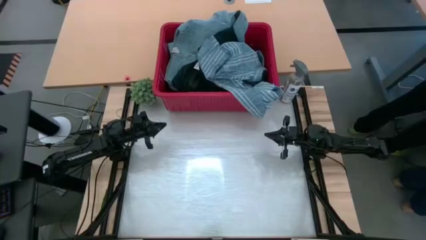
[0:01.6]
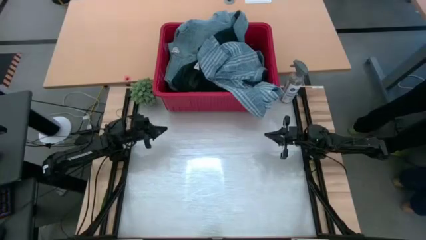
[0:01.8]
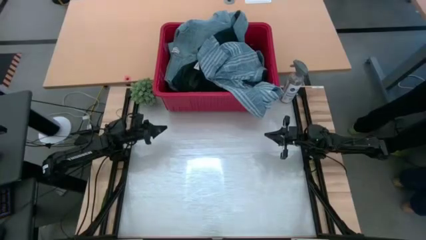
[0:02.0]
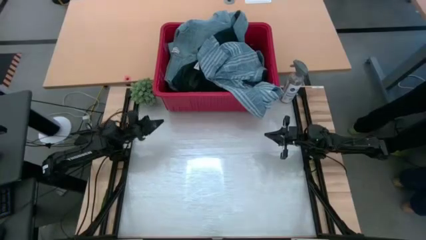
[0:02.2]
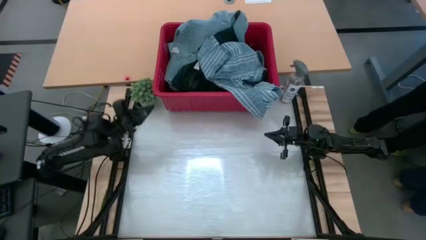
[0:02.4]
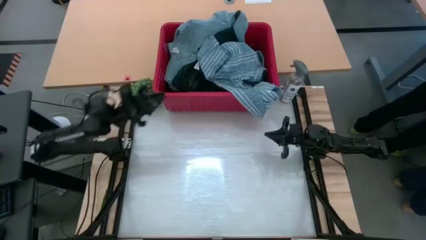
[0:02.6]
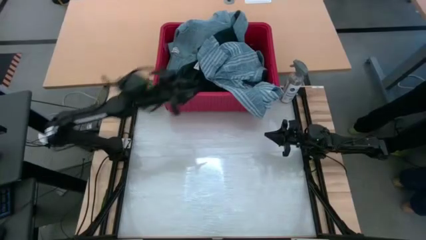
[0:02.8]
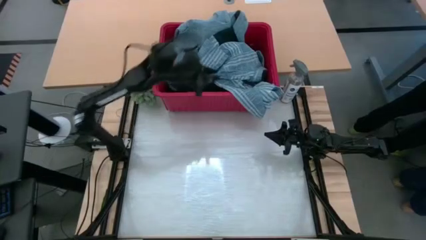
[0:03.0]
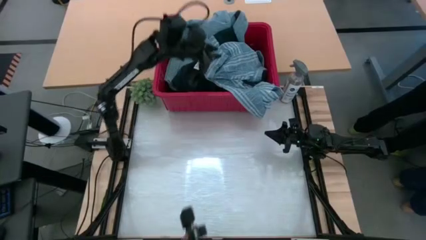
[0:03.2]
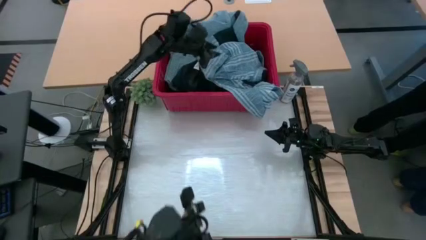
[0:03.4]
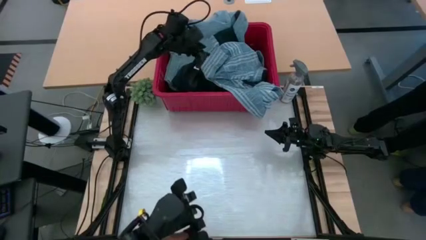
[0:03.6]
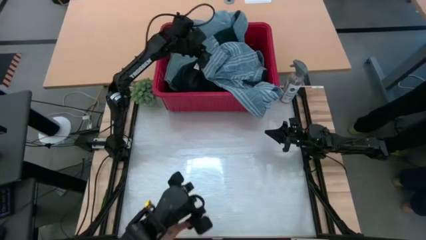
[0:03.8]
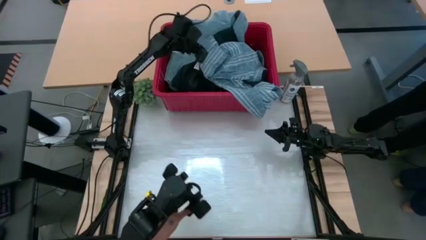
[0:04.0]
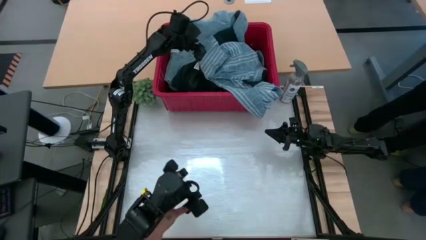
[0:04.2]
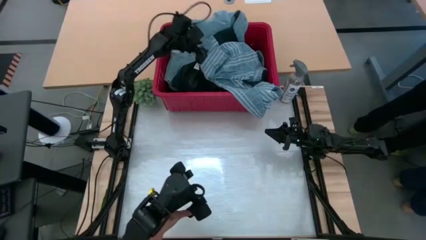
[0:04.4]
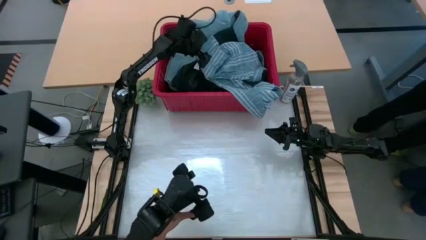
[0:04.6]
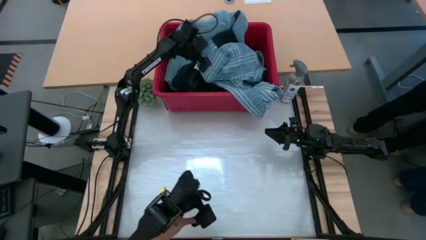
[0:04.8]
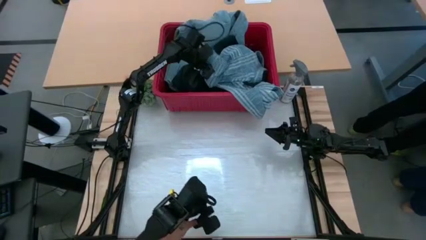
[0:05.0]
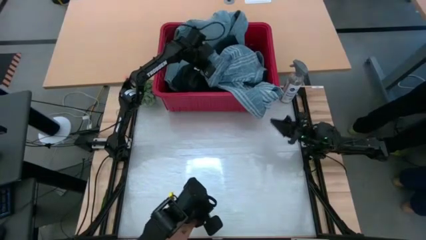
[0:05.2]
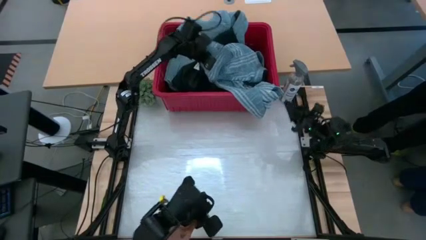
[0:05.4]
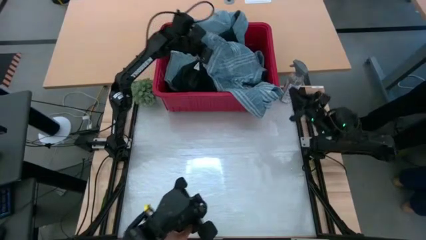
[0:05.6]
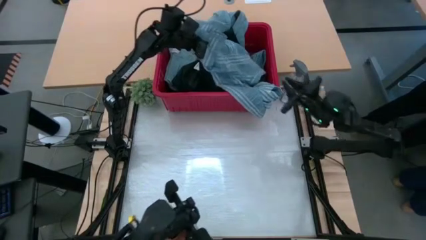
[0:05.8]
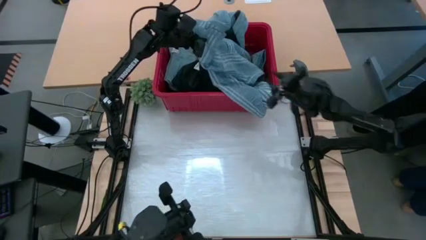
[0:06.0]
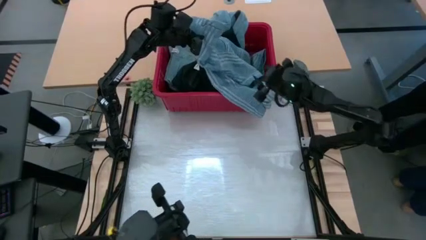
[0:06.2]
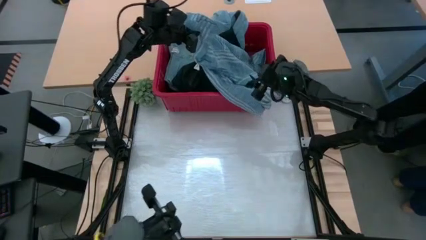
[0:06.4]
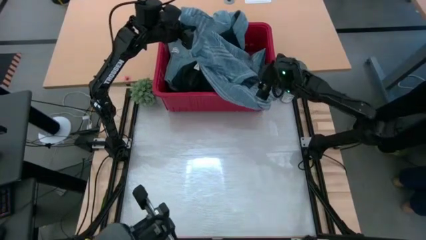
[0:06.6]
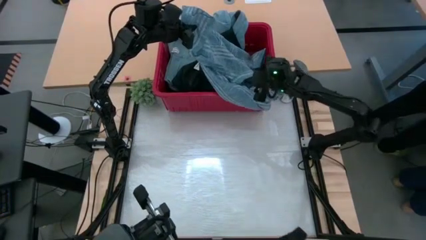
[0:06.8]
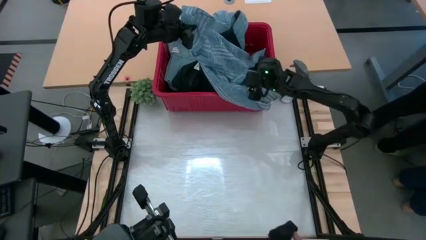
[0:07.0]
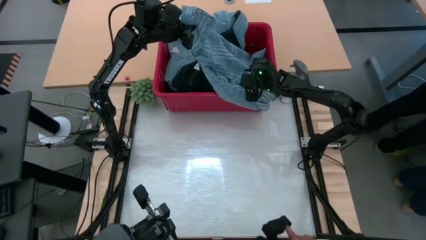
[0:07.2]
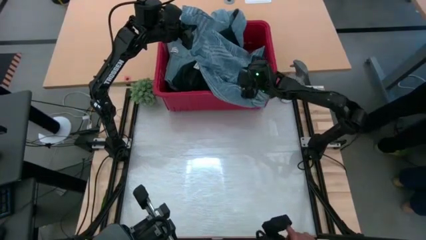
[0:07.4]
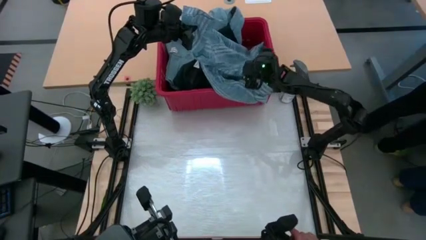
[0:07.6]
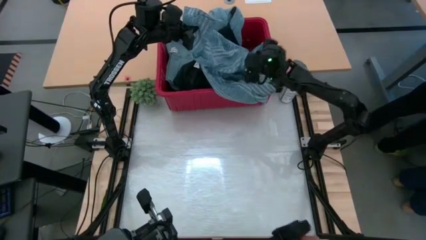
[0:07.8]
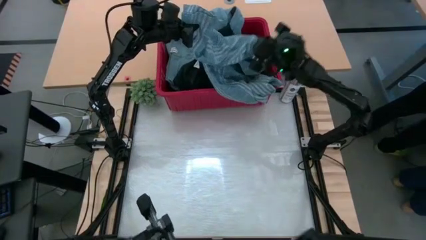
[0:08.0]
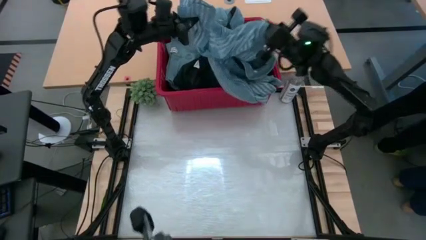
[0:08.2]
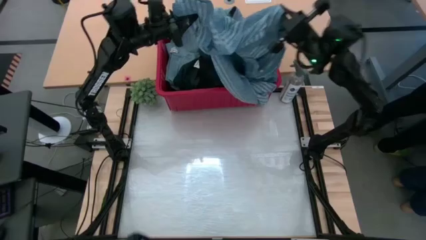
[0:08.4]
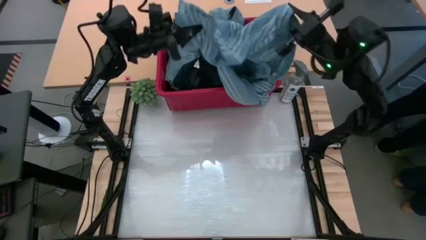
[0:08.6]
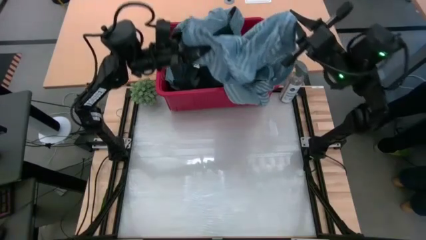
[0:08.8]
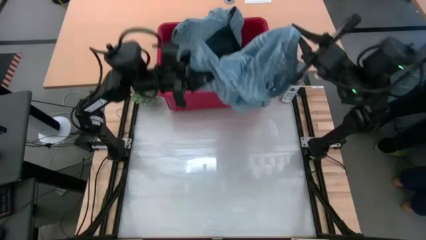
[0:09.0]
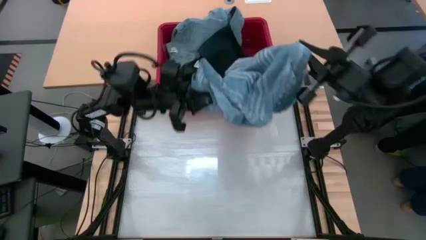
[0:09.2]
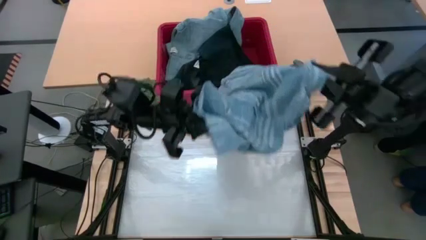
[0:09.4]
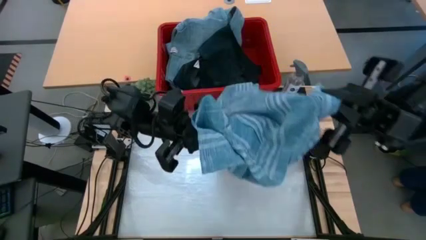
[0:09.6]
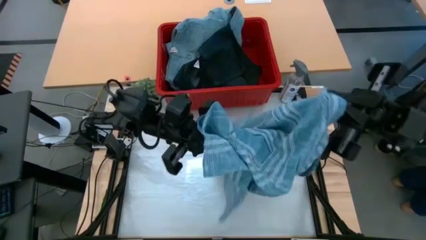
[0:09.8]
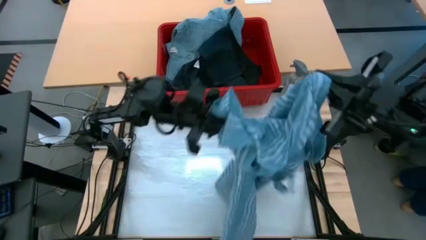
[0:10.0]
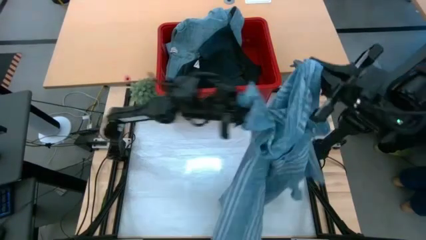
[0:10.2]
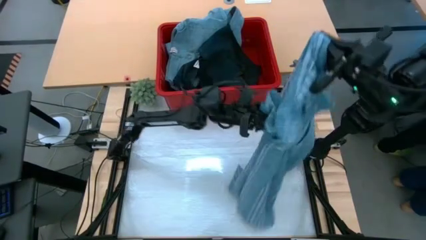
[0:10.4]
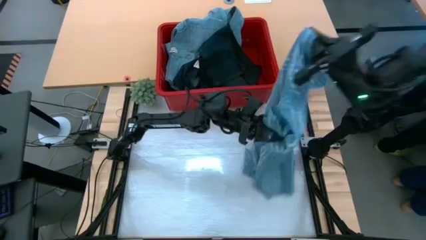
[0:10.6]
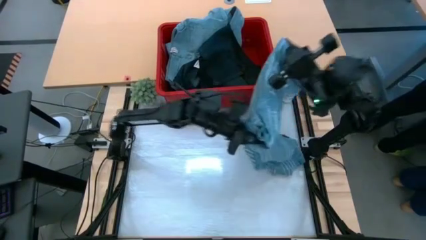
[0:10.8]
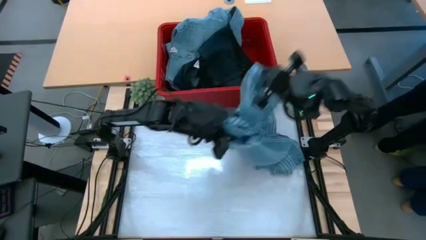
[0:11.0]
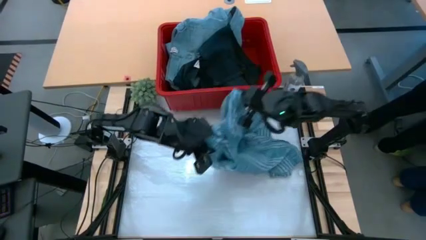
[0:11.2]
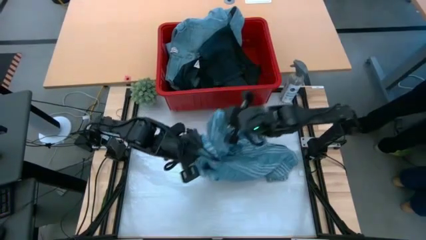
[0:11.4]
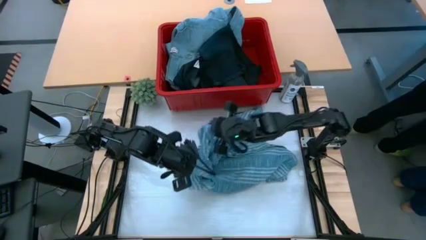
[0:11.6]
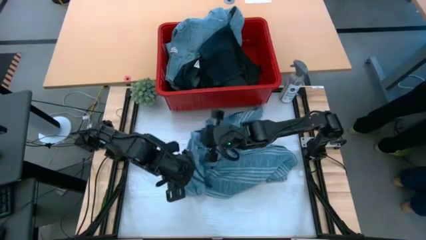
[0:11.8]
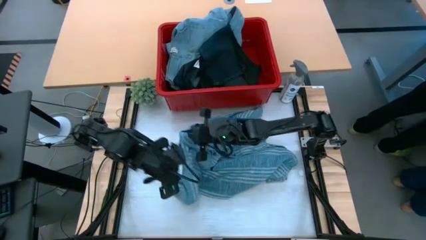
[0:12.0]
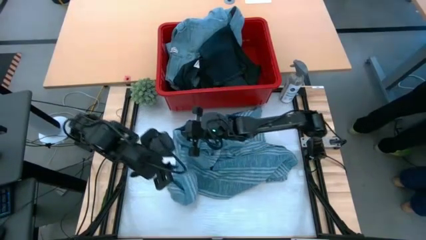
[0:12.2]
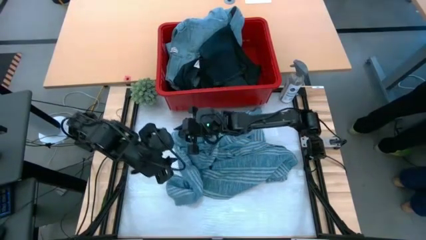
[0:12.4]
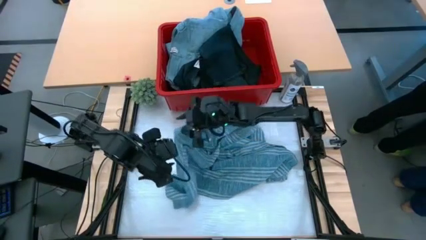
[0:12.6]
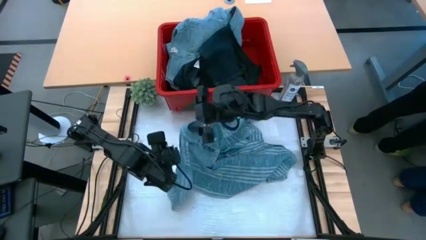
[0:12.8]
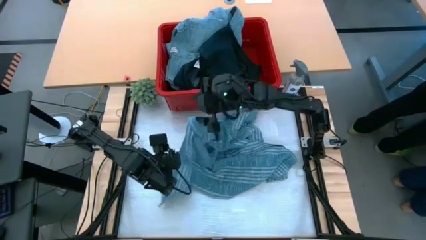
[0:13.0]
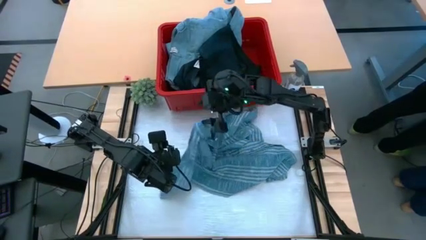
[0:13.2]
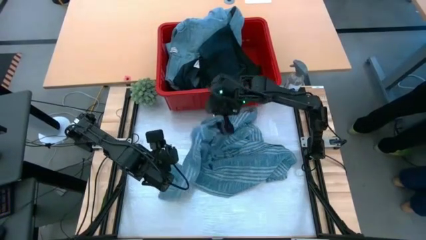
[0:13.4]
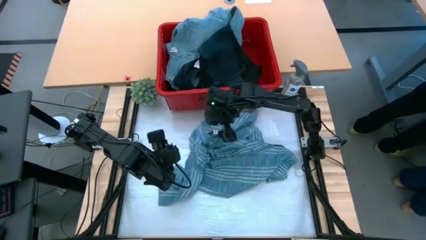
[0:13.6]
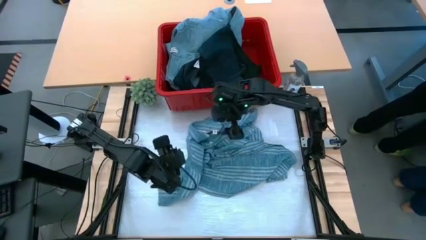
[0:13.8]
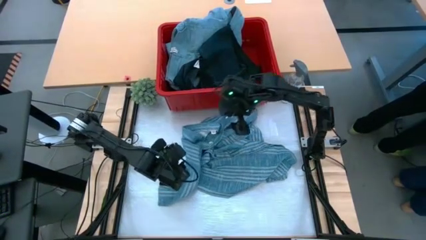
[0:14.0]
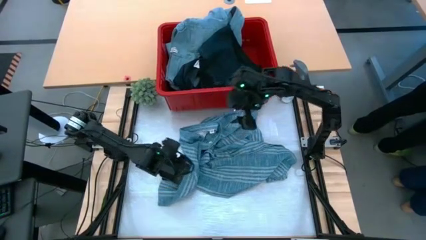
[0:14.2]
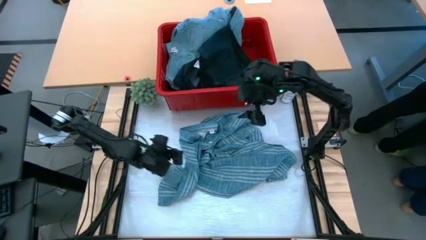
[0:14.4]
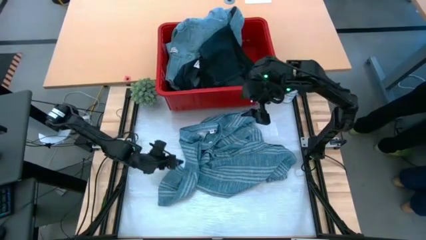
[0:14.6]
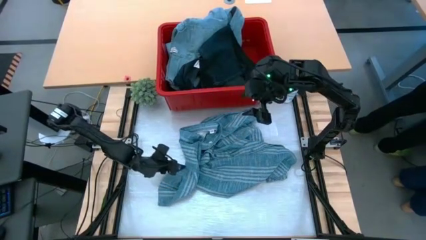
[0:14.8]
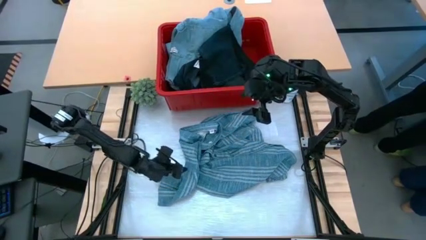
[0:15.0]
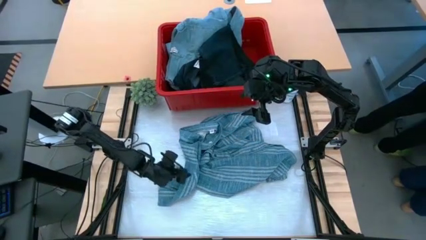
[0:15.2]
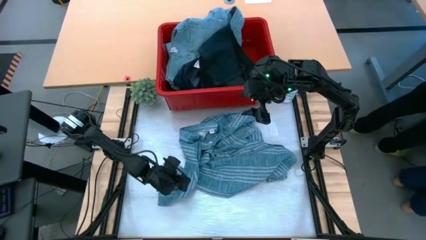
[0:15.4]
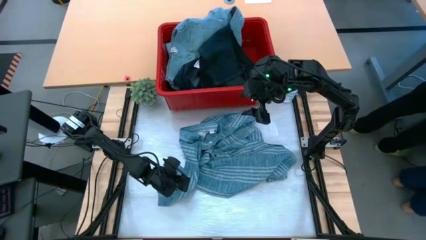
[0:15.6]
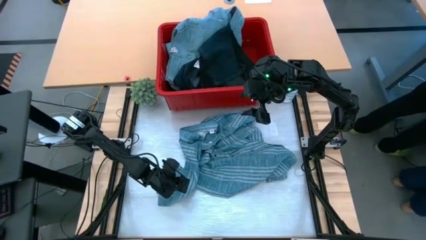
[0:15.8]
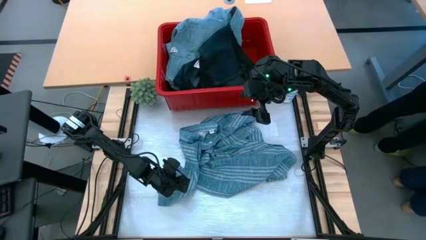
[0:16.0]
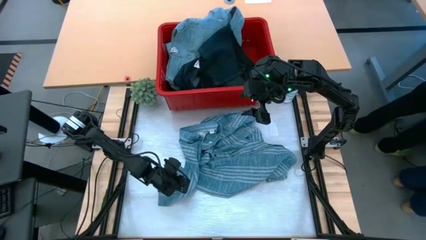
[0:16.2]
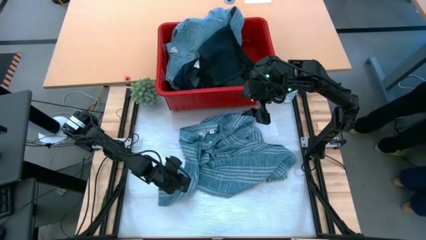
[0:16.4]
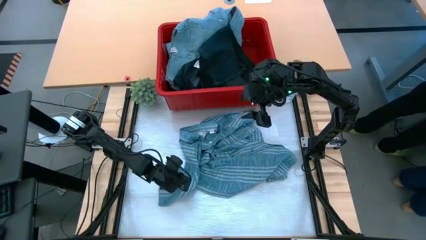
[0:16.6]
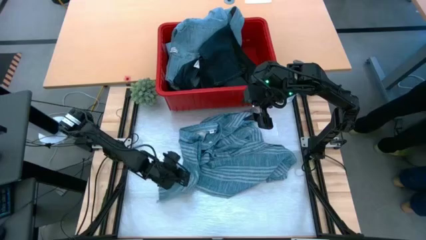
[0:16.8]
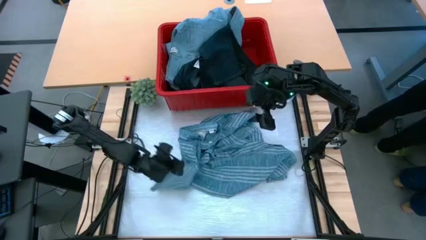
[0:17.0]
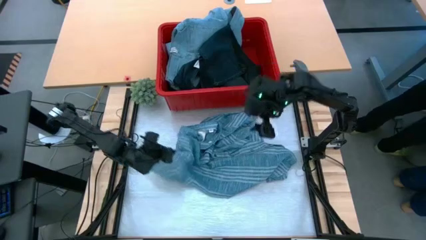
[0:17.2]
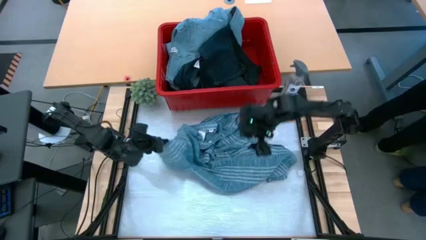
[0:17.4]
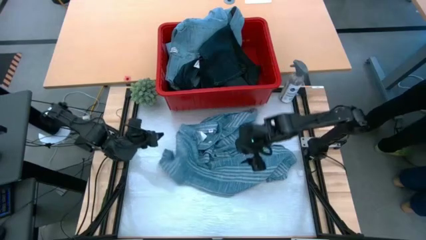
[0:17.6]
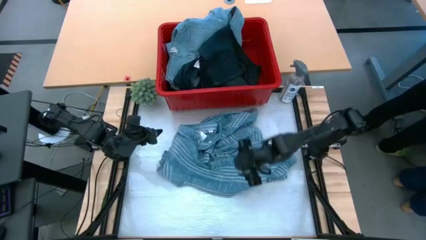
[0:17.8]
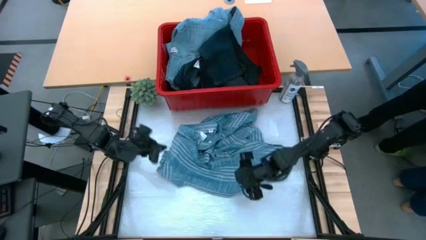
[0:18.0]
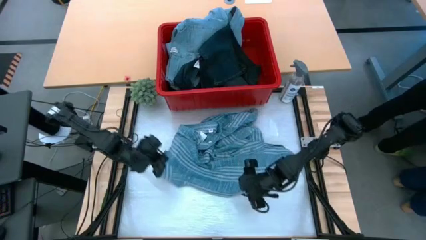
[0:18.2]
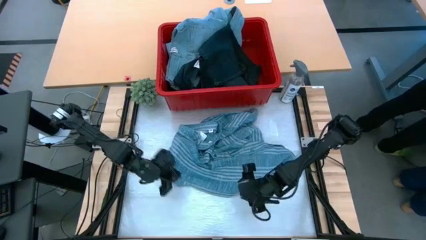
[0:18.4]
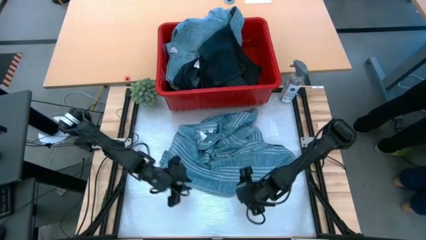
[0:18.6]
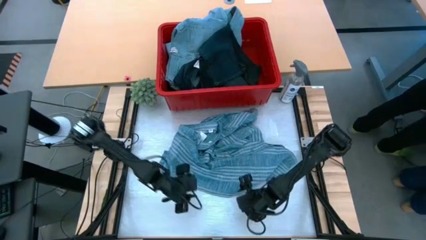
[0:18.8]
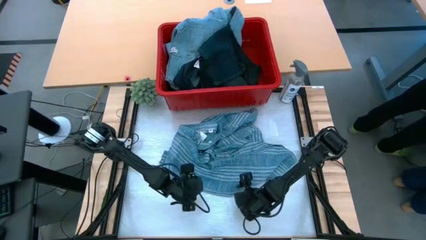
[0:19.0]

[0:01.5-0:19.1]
Task: Fold Laundry from Bin
Fold the blue polo shirt
